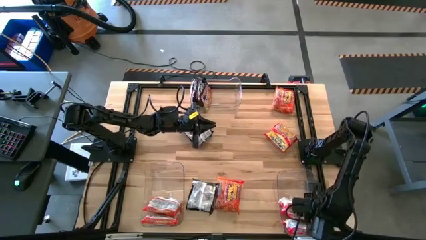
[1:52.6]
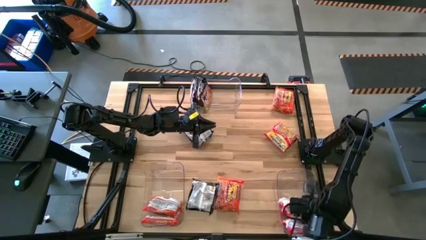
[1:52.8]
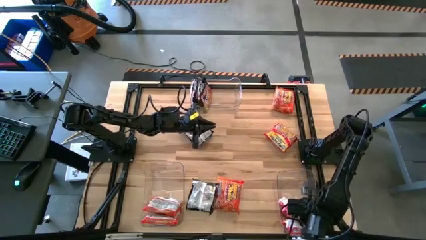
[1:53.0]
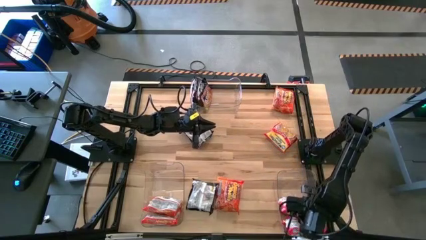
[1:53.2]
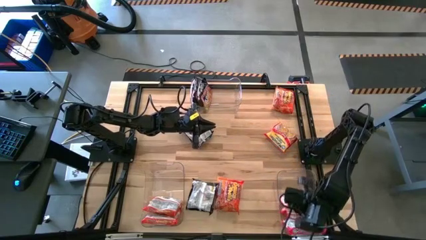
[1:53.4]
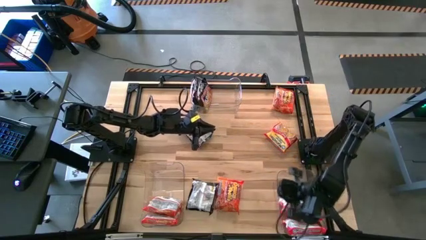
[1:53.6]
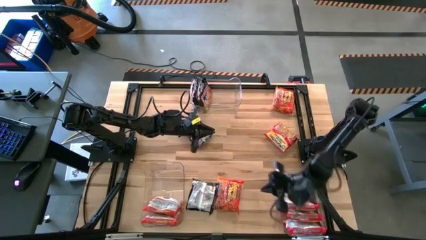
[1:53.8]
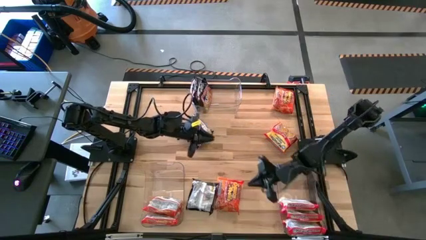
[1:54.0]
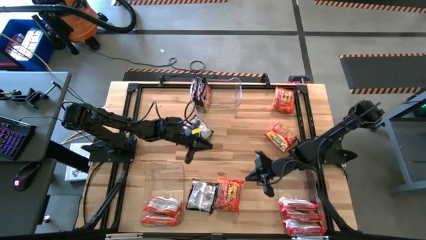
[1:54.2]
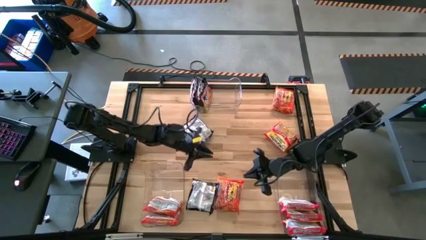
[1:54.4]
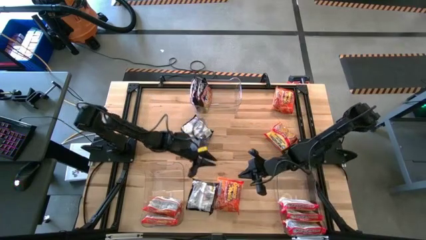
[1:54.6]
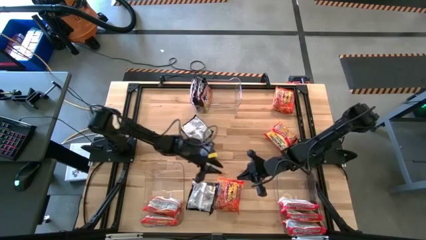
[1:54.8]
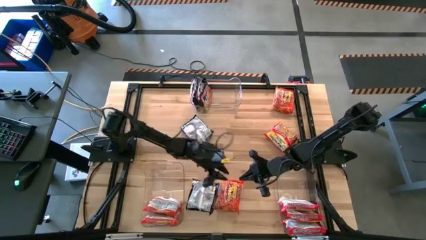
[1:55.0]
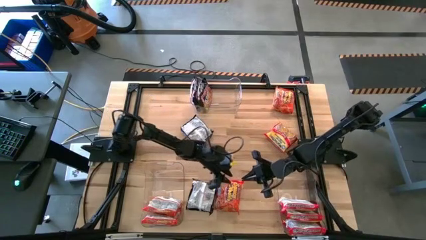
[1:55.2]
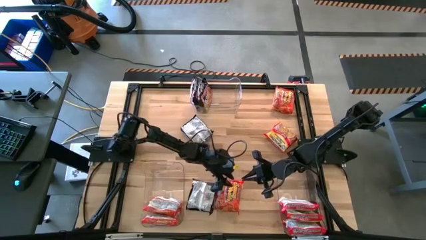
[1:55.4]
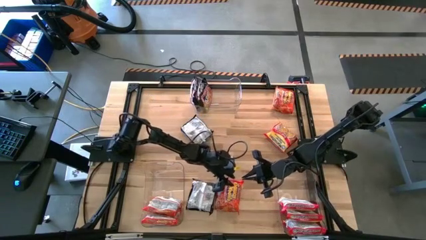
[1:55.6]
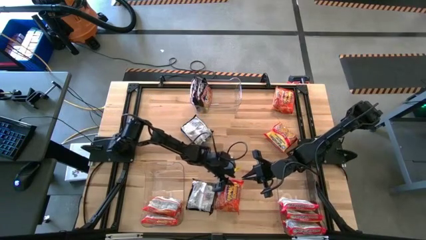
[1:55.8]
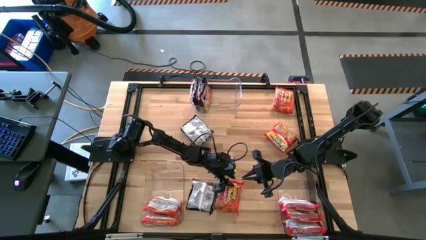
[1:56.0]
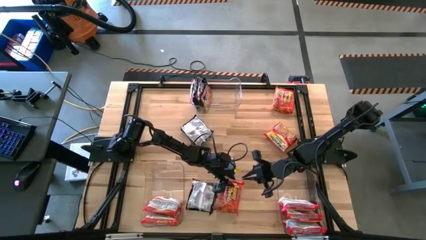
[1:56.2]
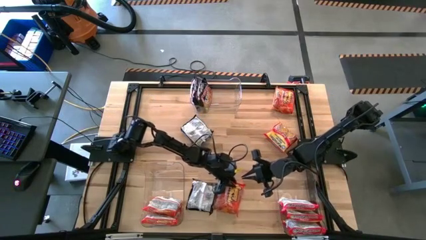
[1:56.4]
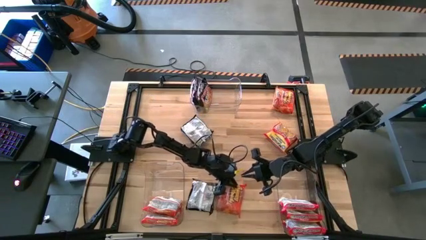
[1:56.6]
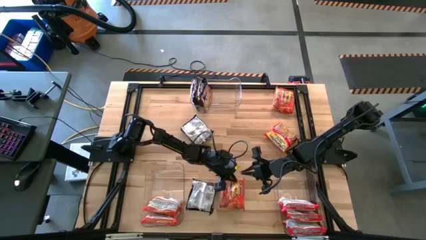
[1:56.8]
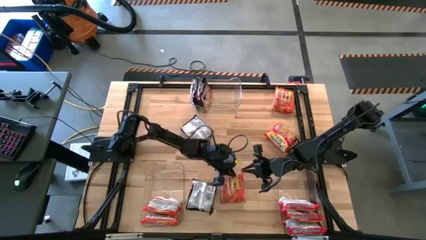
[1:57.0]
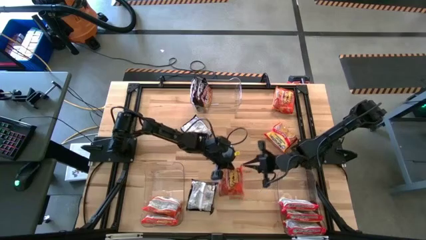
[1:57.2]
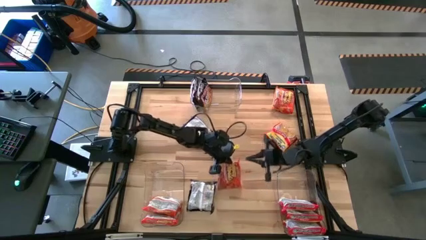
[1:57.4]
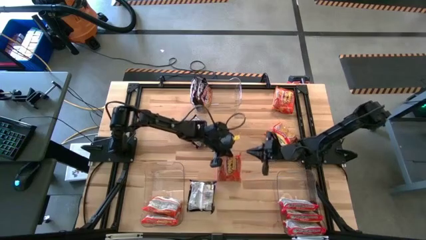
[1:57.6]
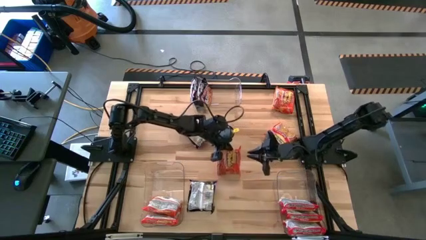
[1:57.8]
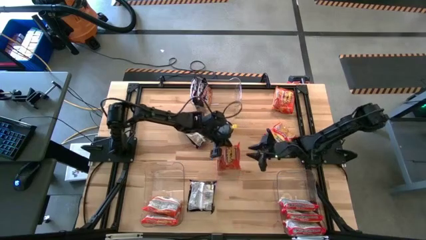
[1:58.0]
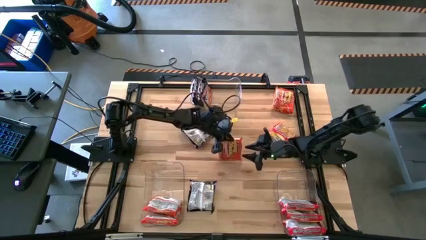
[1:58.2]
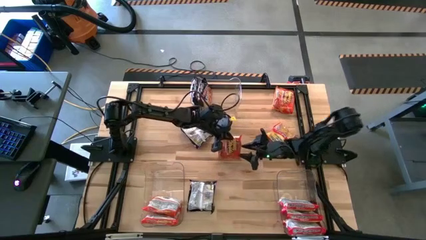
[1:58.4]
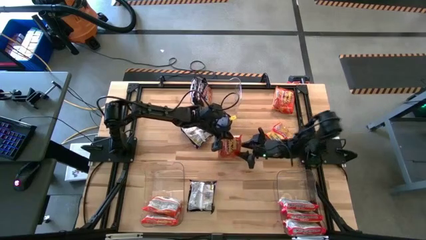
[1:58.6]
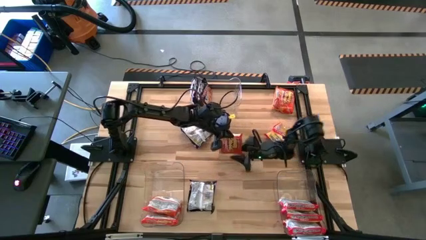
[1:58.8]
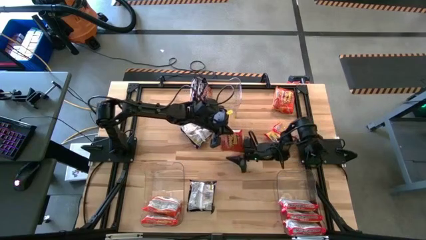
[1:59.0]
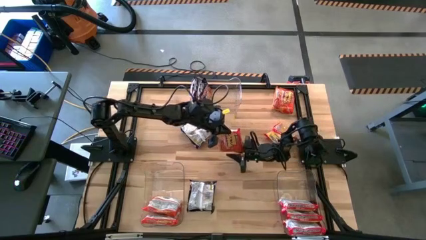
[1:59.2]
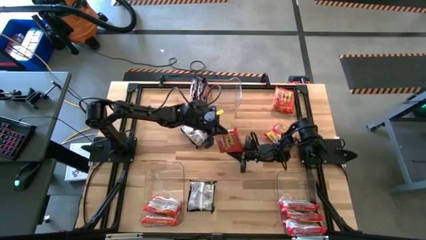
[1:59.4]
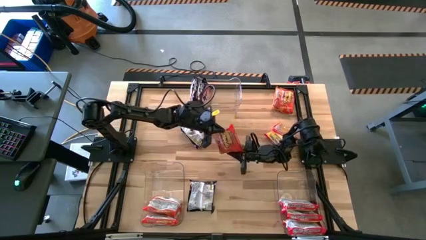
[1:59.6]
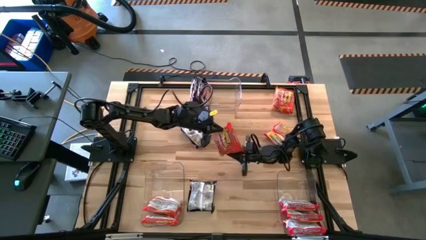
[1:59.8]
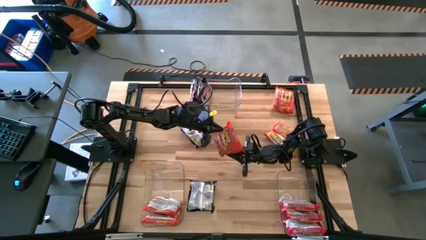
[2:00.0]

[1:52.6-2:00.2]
Task: Sort Maruchan noodles
Put the bottom orange noodle pack into the bottom left transparent bin

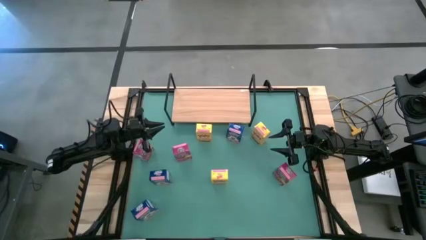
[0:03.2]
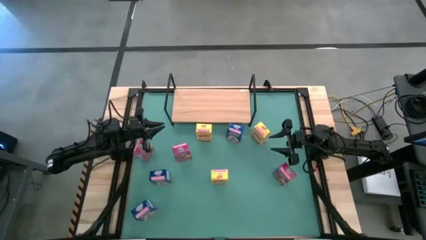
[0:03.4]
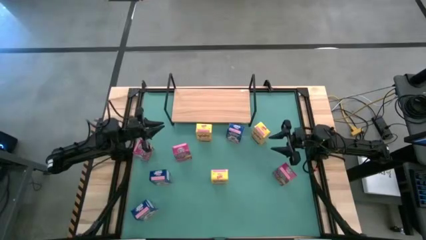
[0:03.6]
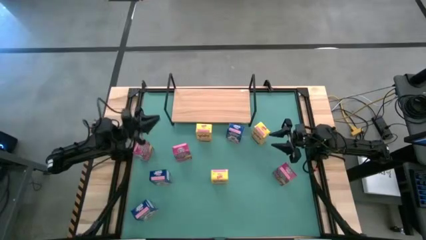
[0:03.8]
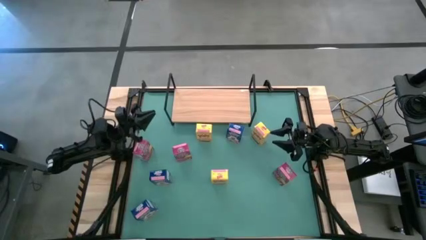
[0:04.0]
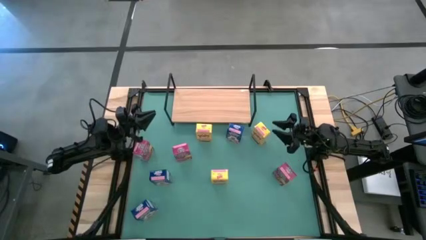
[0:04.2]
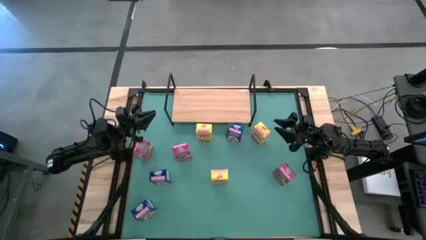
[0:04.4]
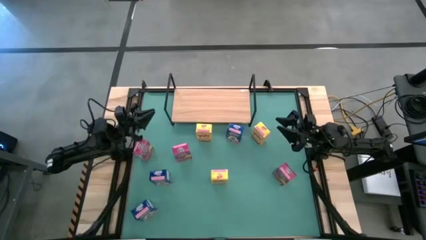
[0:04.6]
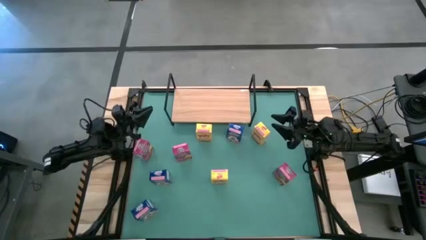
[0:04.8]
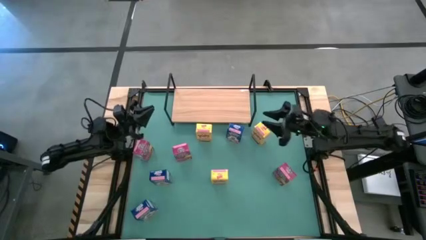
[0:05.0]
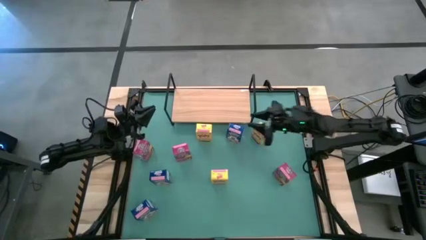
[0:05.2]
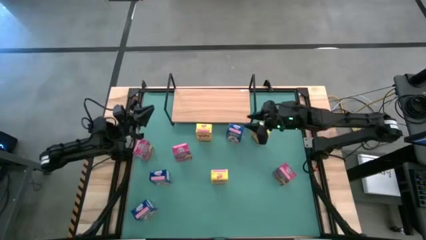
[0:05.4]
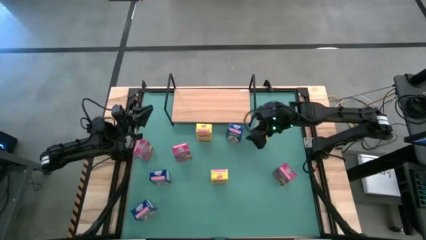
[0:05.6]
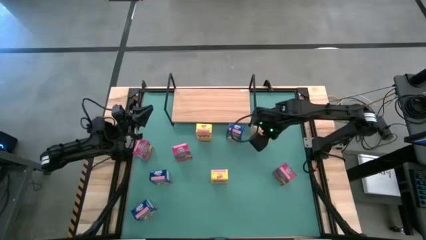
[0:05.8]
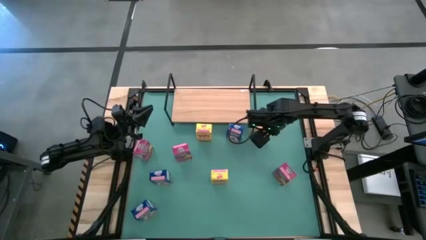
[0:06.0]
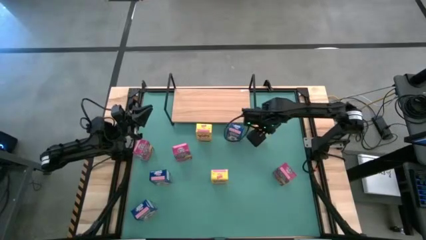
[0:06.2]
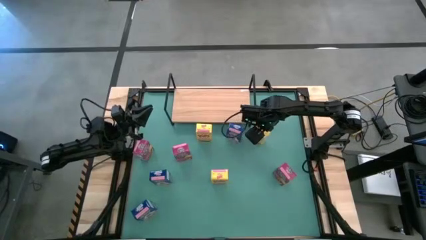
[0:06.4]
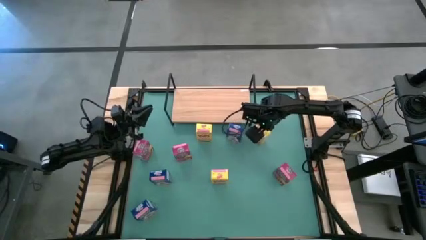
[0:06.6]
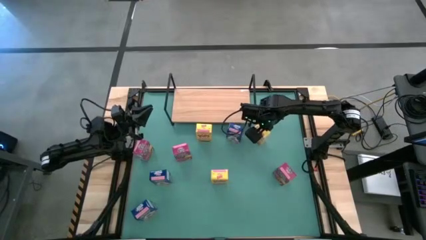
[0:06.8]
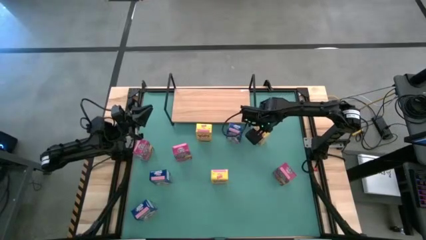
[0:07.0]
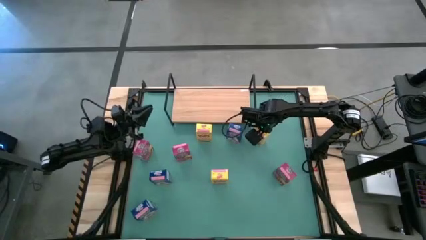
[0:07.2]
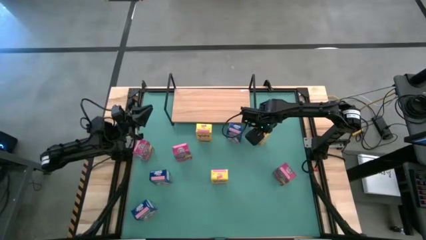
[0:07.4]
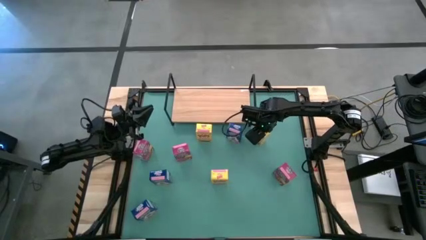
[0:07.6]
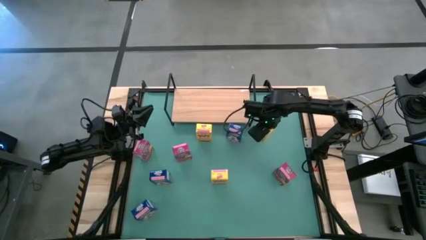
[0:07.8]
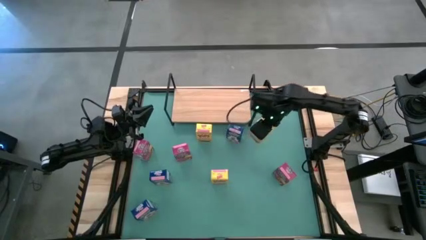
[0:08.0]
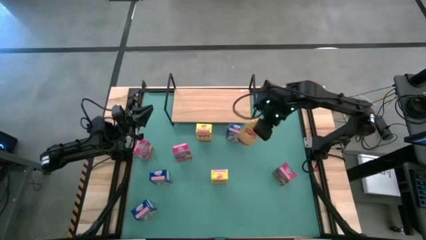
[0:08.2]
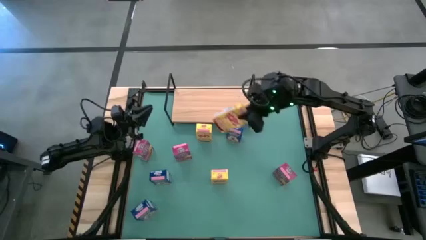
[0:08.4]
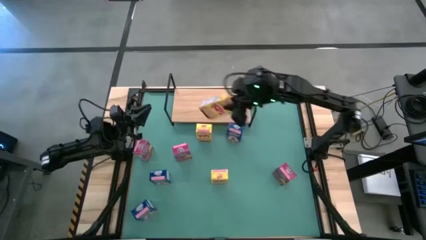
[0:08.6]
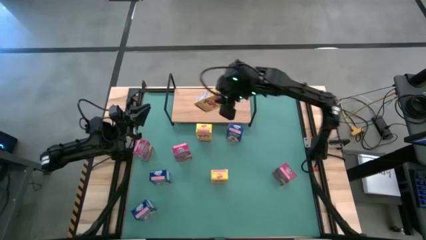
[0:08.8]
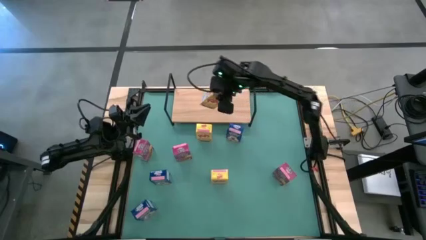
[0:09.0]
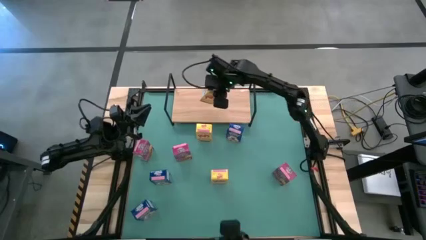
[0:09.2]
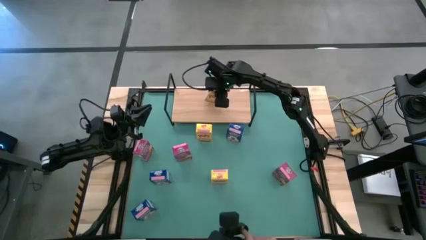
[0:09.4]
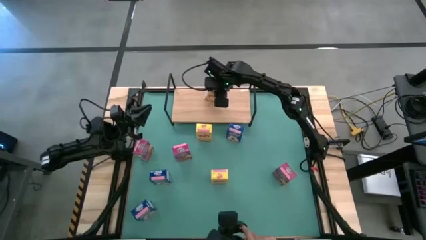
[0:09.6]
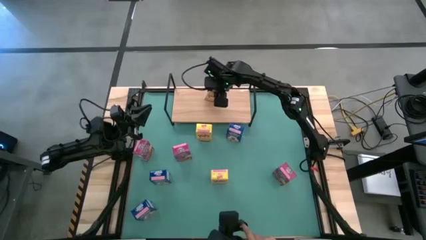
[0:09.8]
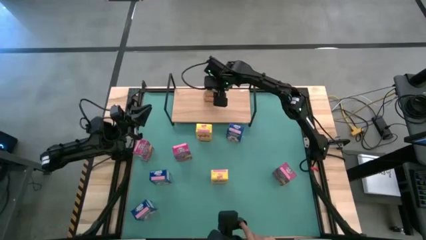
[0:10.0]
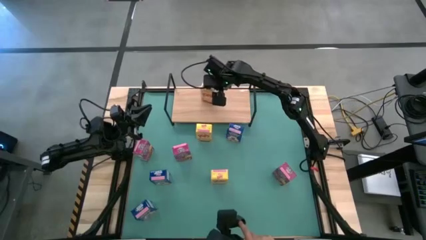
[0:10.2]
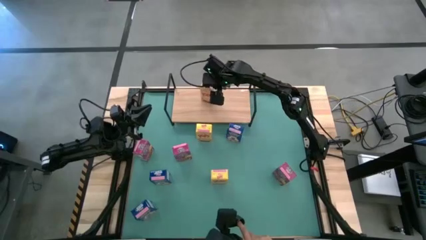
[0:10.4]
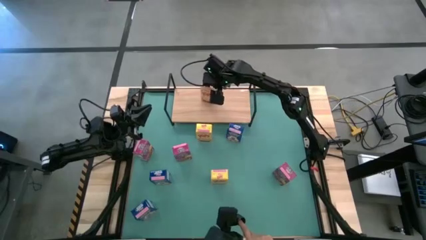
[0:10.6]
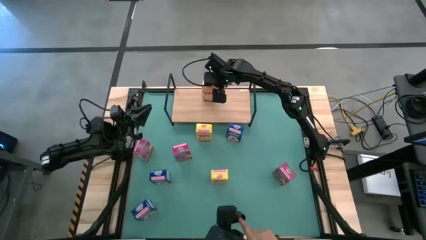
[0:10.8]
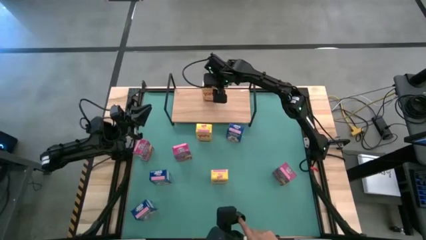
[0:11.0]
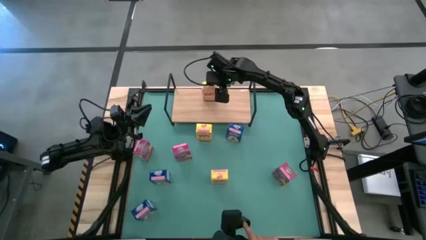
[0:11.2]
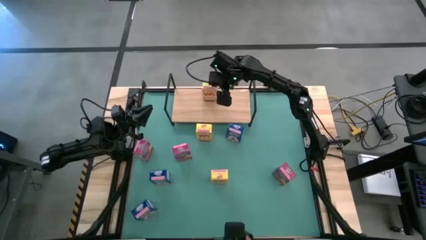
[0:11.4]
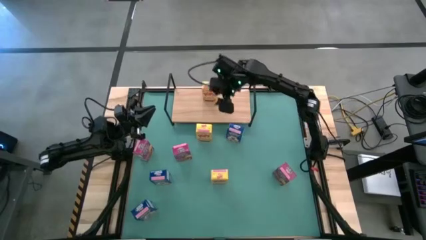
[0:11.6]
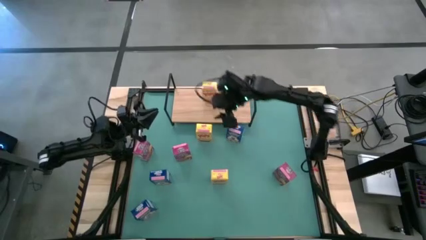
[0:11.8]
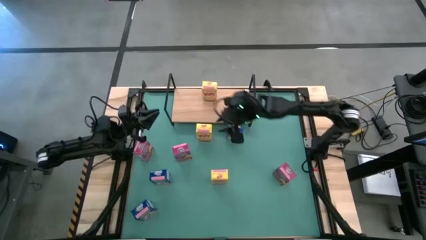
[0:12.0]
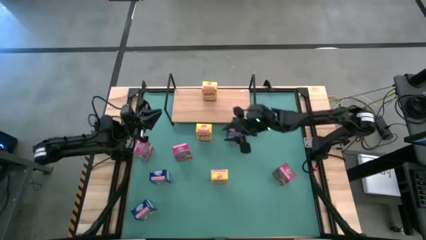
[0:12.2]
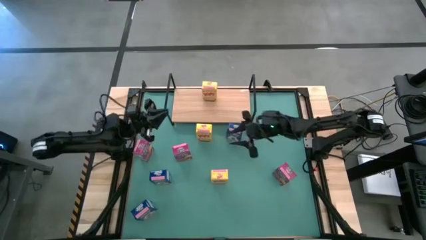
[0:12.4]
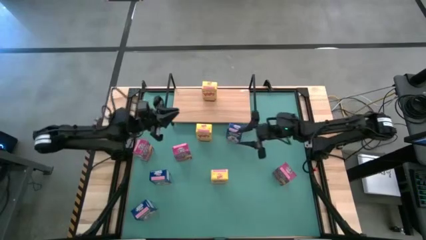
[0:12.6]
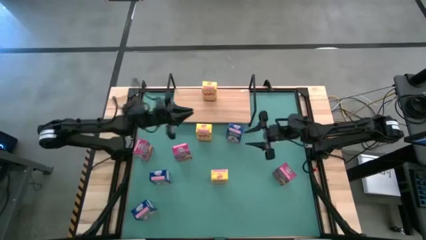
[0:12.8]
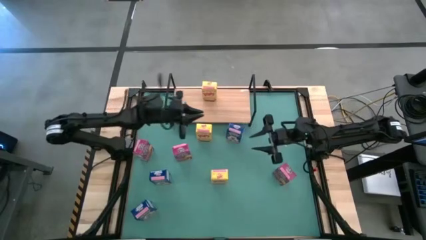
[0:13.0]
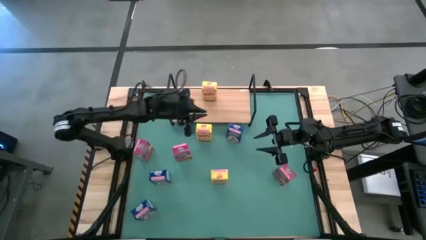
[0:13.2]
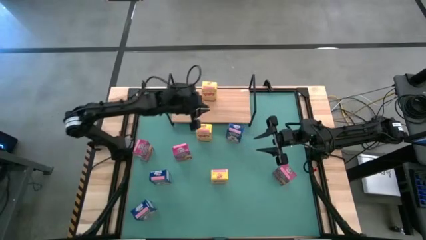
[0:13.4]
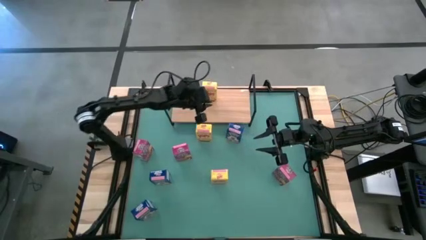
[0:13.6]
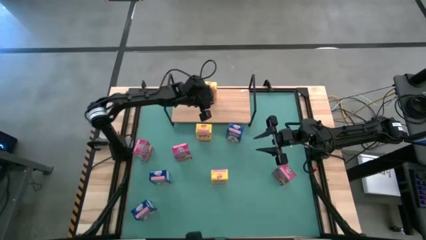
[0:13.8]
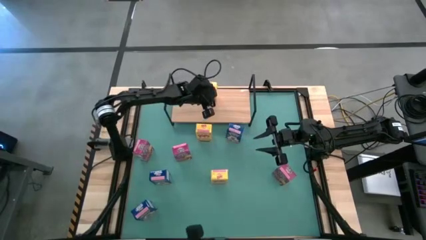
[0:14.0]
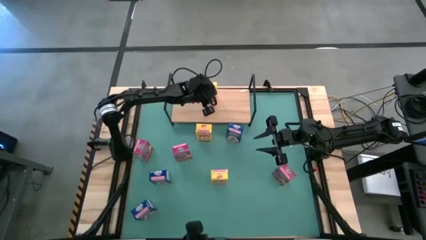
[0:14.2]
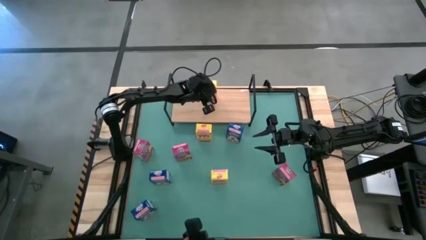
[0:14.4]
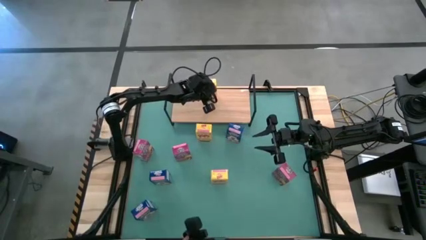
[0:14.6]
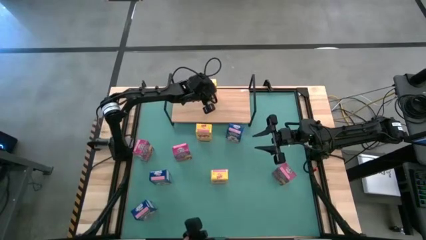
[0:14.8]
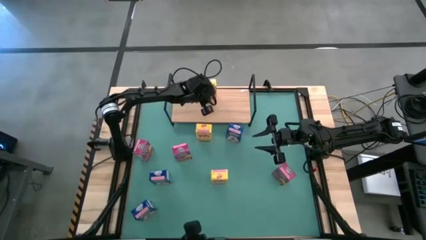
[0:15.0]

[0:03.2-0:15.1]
Task: Stack cereal on shelf
Put the top right yellow cereal box on the shelf
